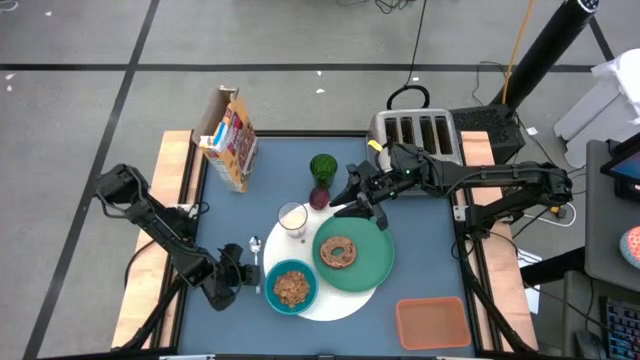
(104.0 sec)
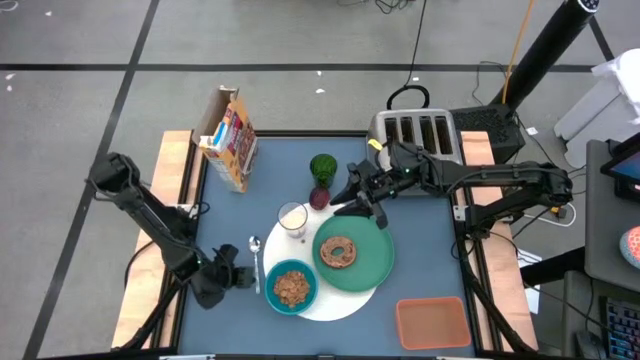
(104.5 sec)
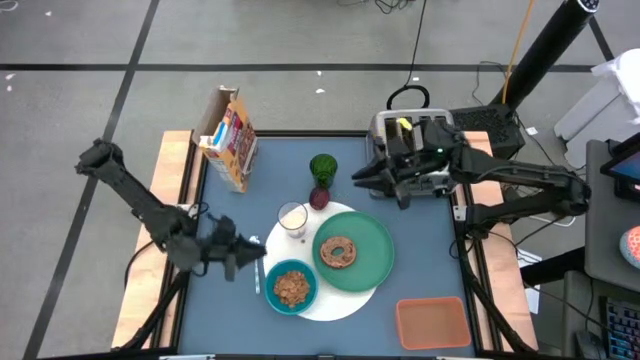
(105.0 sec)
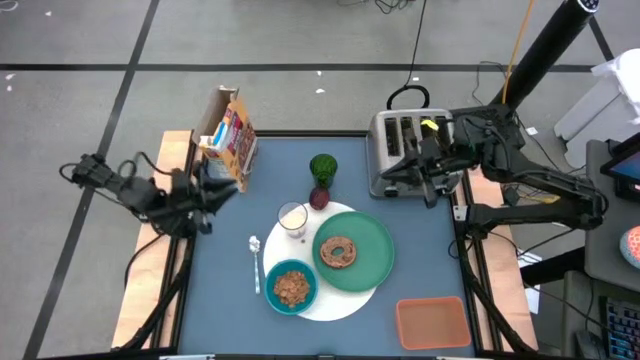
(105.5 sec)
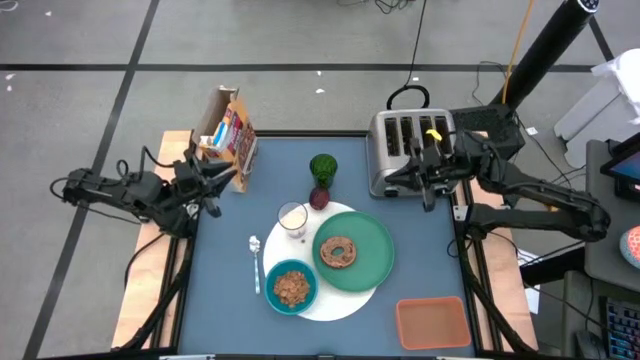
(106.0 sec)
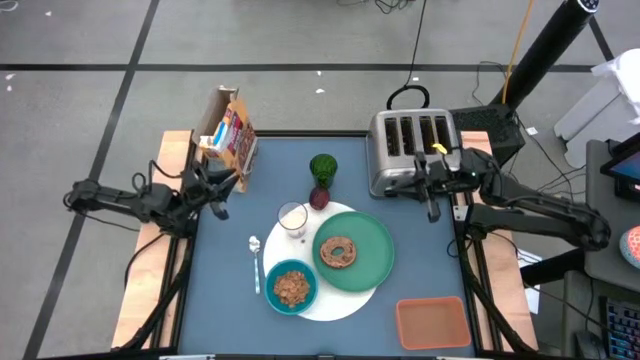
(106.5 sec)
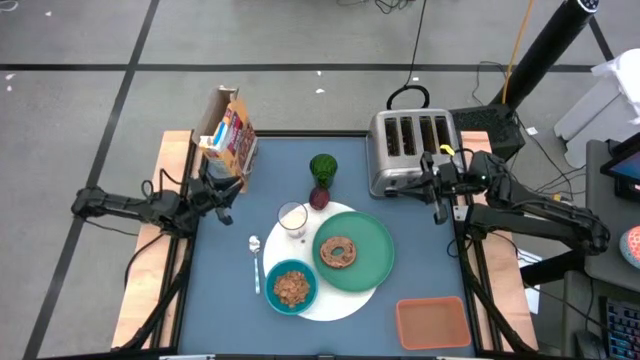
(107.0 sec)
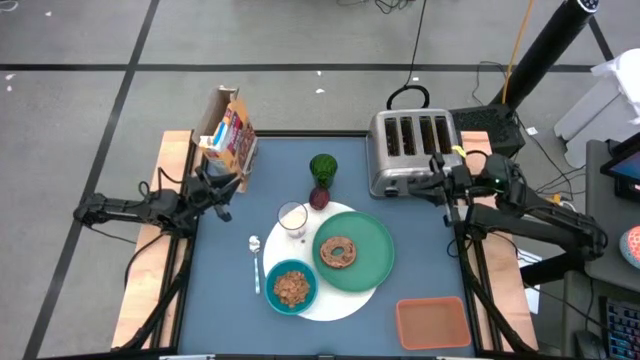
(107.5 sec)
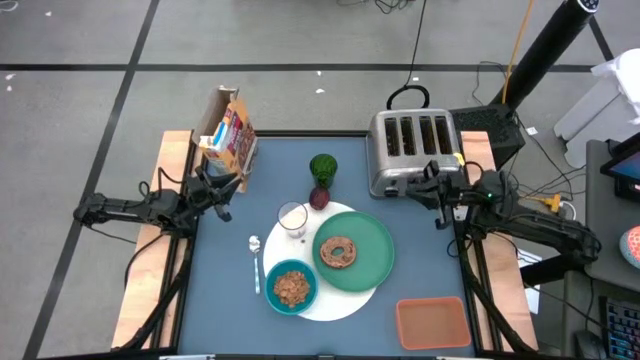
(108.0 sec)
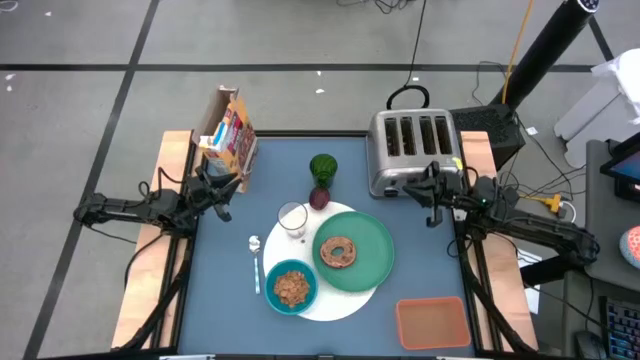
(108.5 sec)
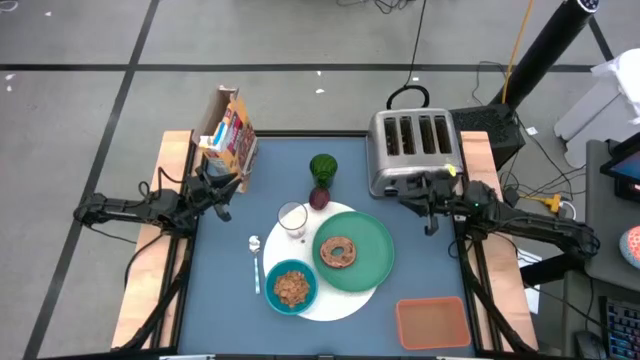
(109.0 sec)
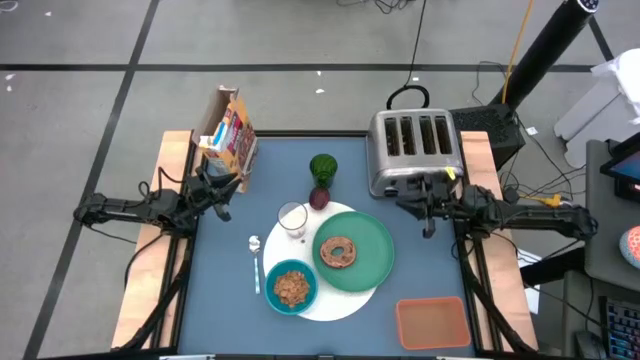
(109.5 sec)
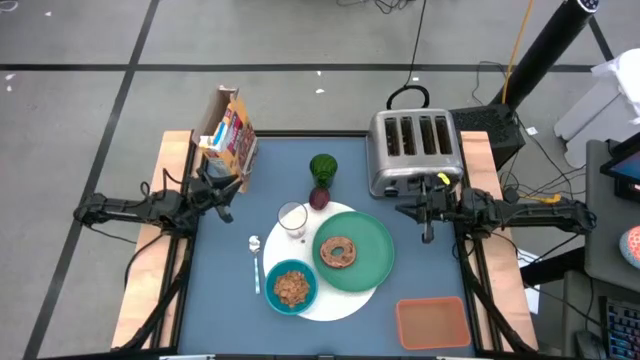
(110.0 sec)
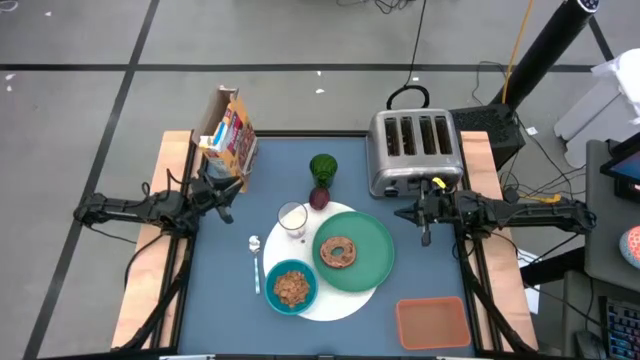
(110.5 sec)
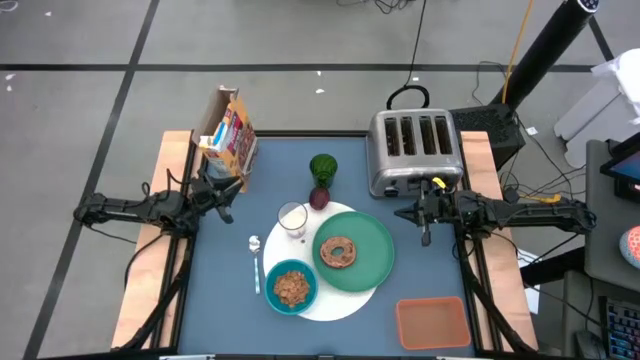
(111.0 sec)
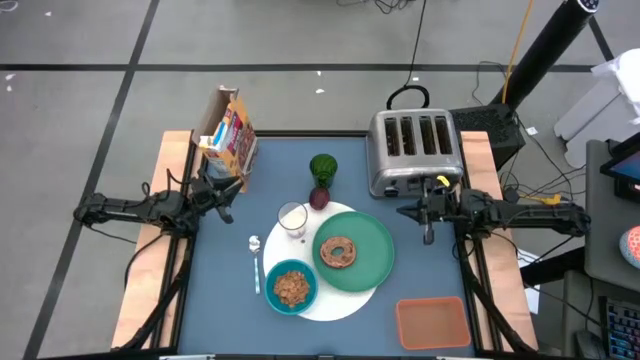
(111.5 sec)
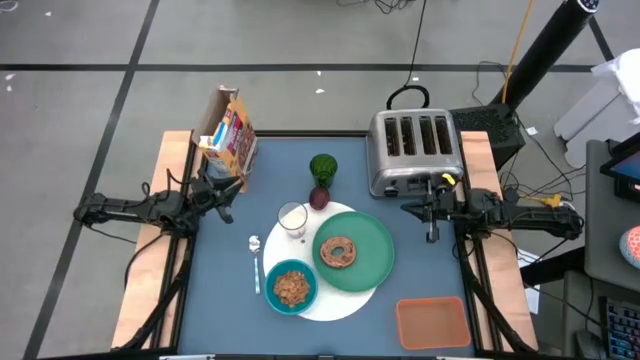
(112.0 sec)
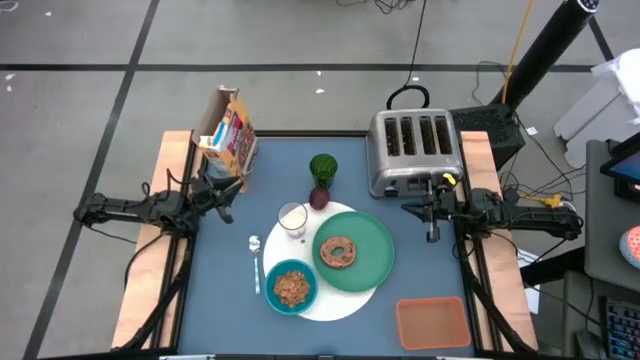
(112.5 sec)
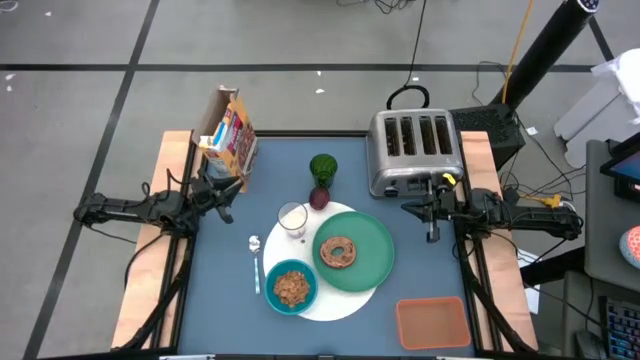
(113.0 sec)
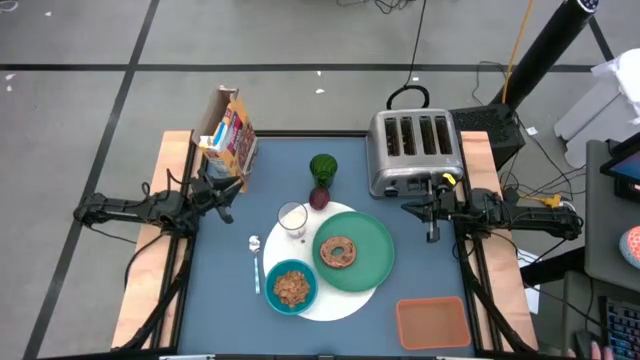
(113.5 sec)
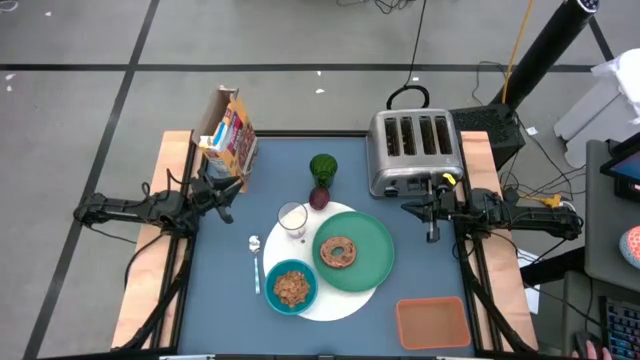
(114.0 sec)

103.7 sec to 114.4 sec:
Task: Arrange a breakfast setting
Return to Home Position

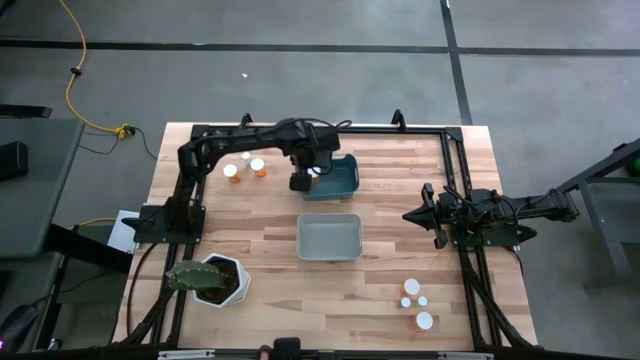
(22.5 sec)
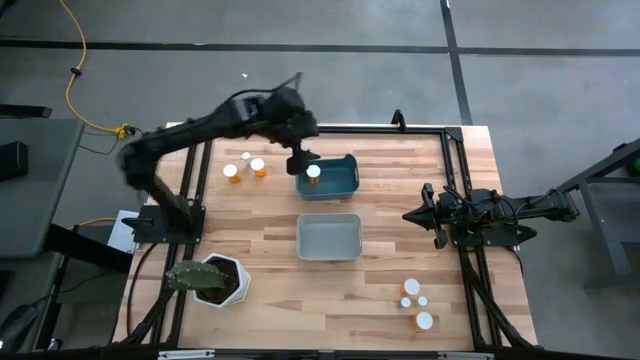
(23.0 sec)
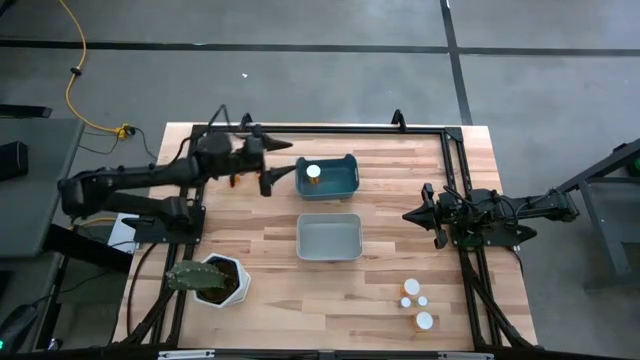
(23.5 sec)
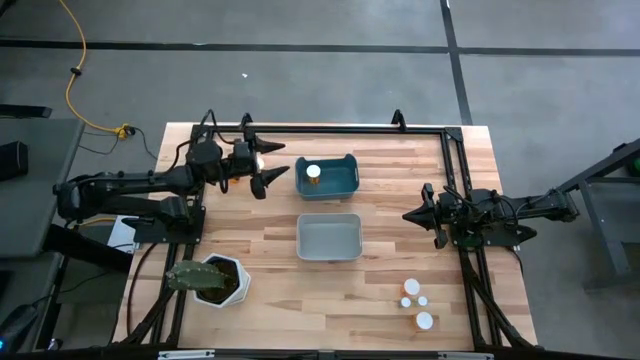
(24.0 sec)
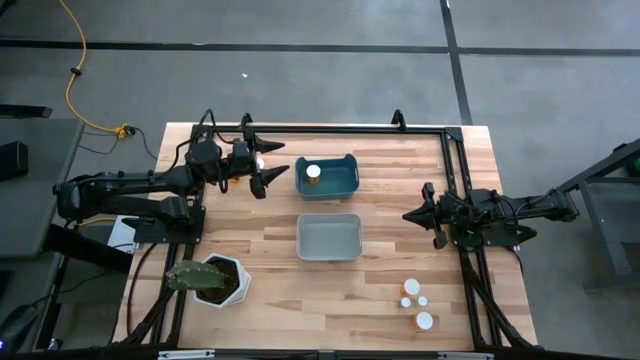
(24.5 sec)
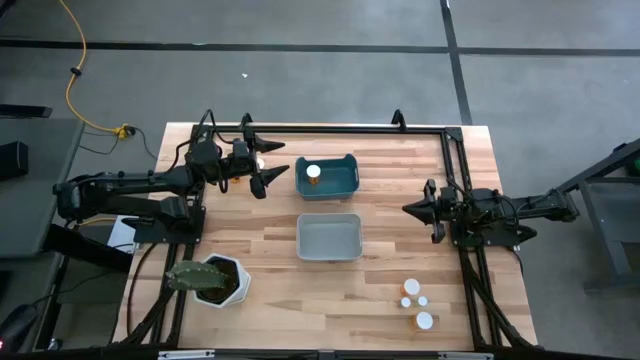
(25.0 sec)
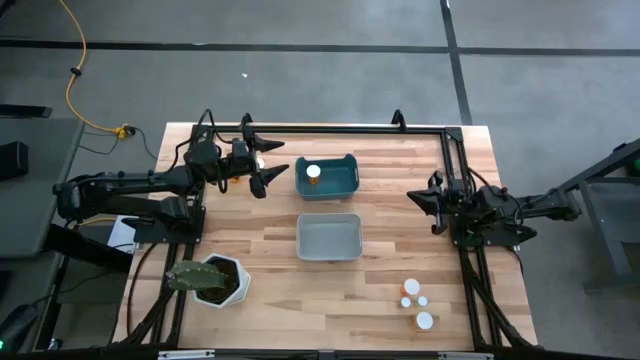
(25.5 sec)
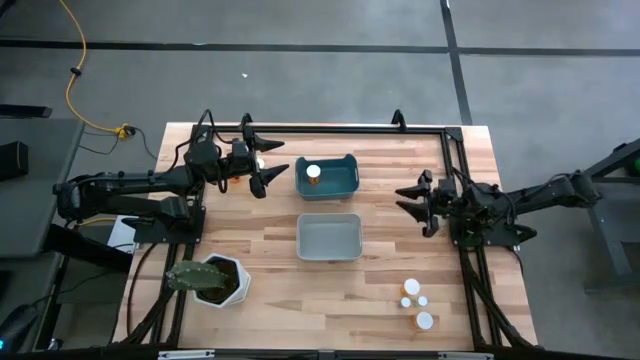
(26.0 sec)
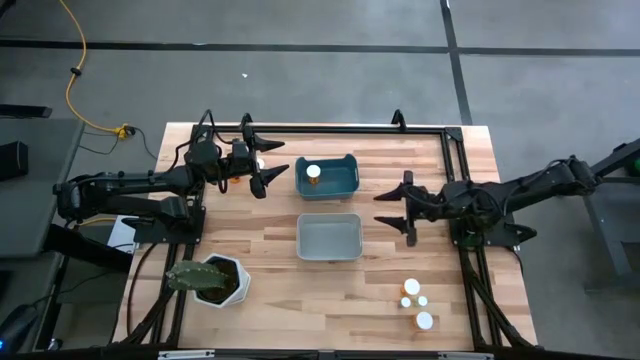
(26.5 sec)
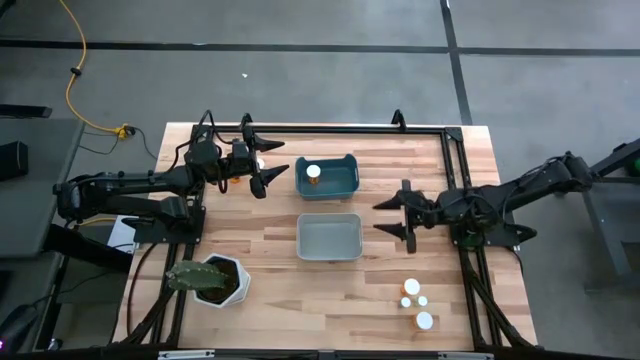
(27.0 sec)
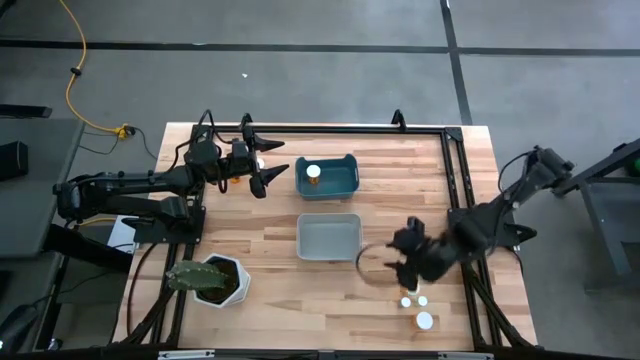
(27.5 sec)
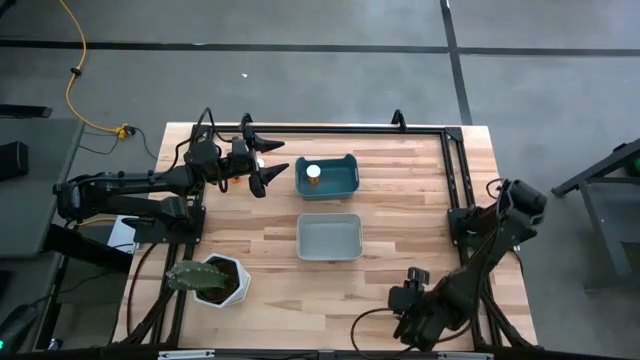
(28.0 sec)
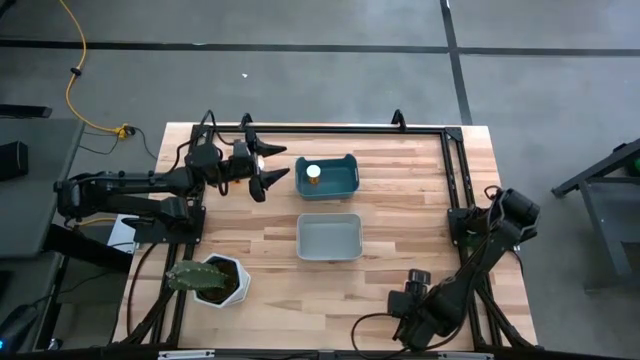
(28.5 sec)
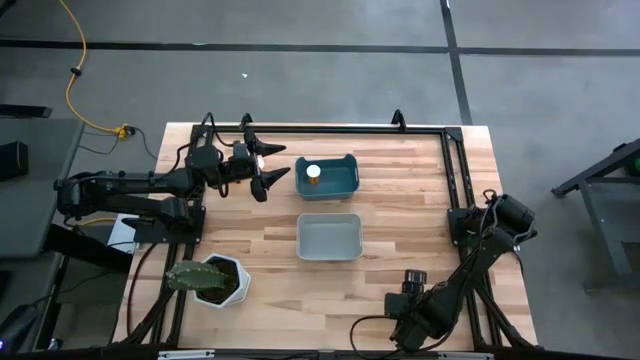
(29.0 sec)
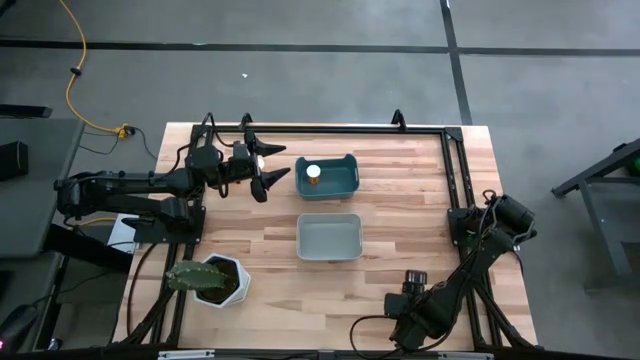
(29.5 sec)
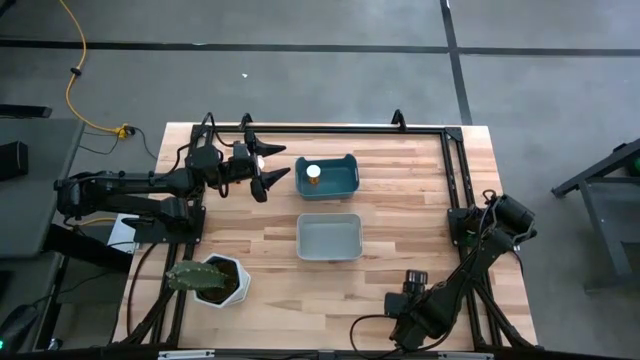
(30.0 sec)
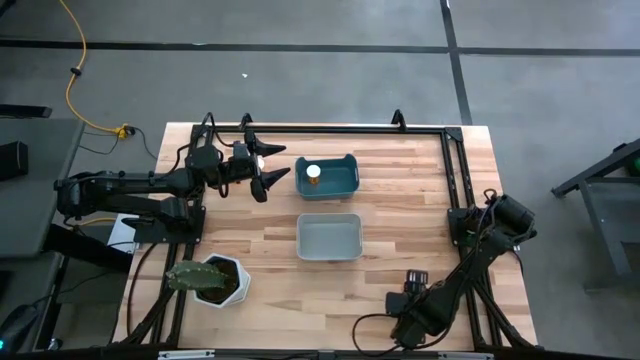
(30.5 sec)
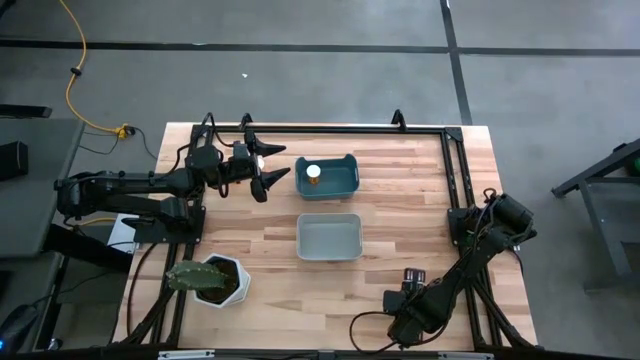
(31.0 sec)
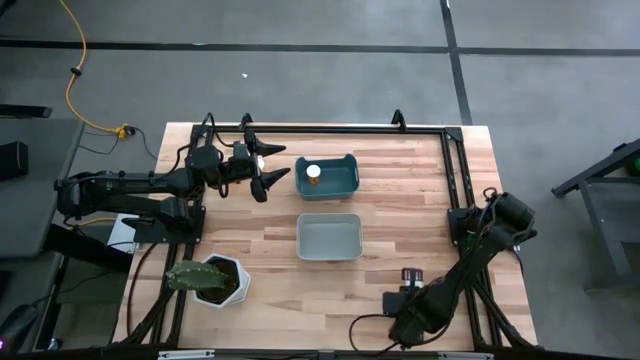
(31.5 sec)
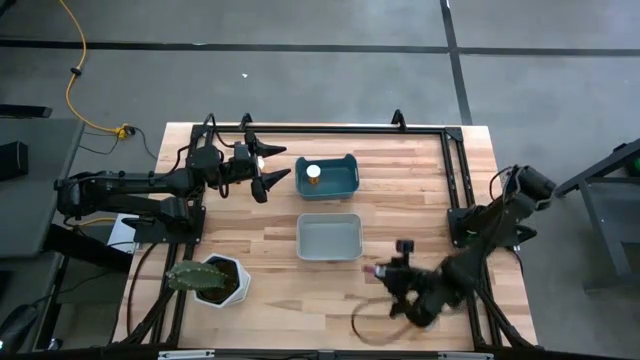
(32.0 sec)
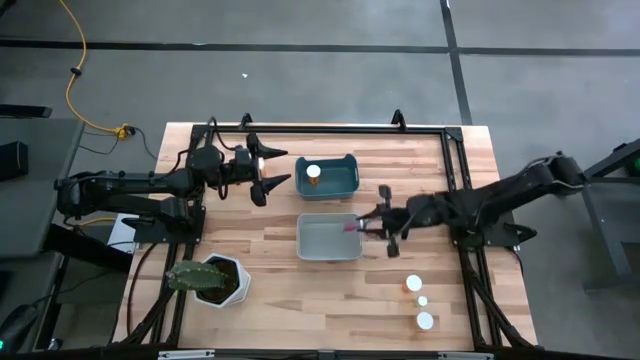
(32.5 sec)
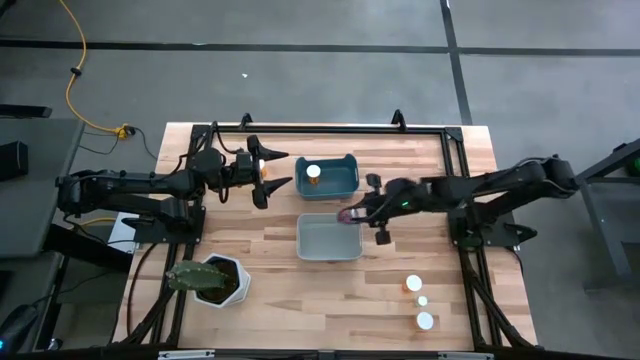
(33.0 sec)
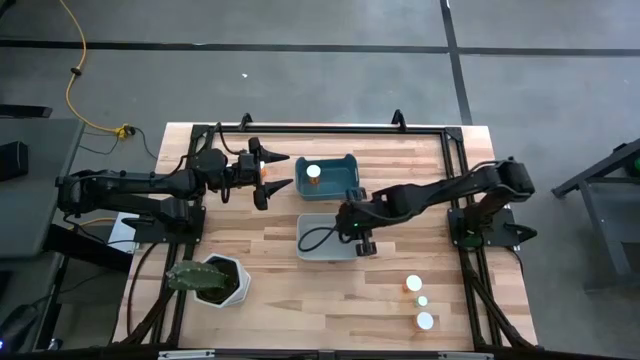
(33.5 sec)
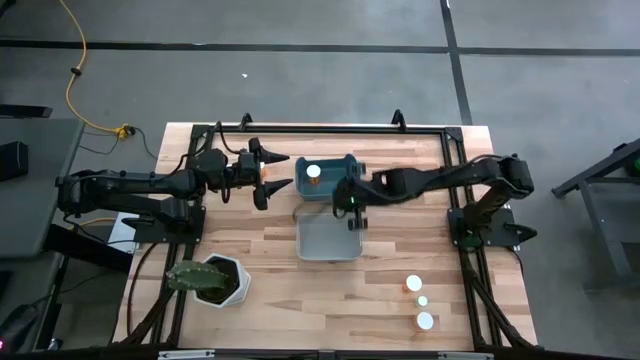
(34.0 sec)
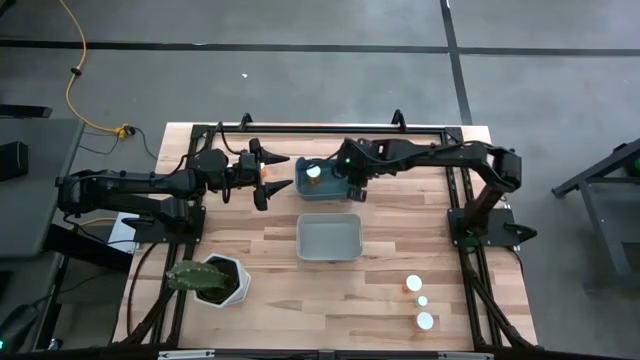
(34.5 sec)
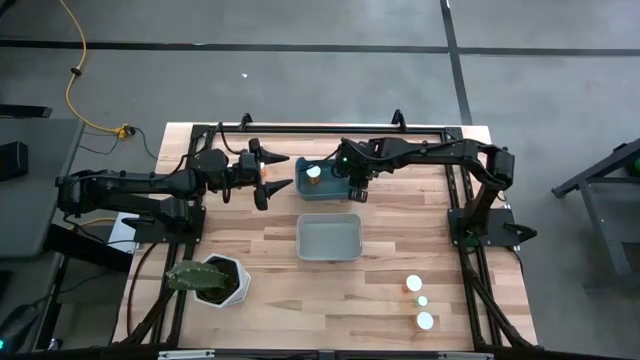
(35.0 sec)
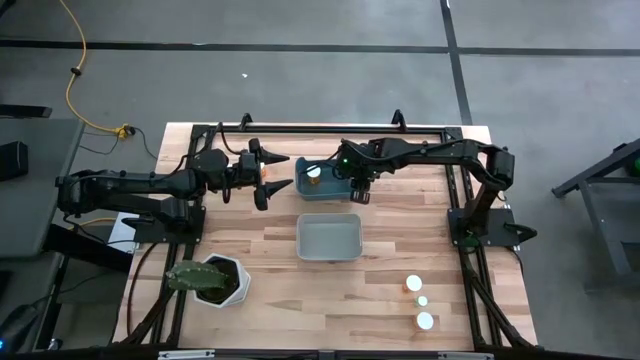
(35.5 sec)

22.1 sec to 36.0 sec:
Task: Pick and place medicine bottles into bin by pill shape (circle, oval)
Put the blue capsule bottle into the blue bin
